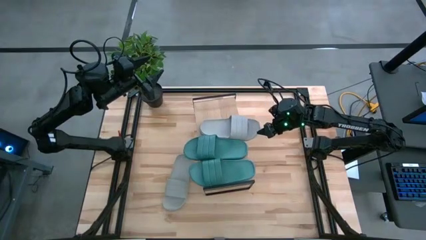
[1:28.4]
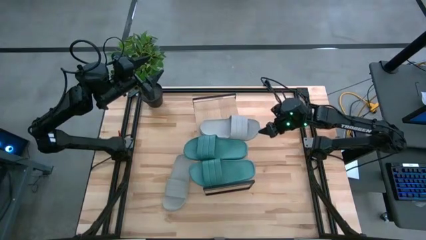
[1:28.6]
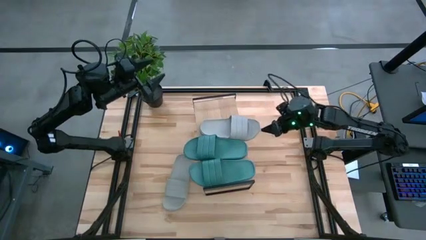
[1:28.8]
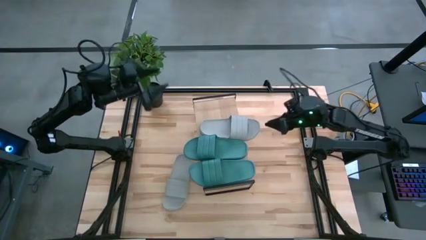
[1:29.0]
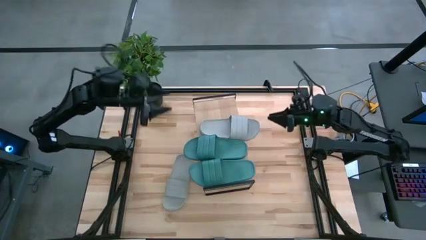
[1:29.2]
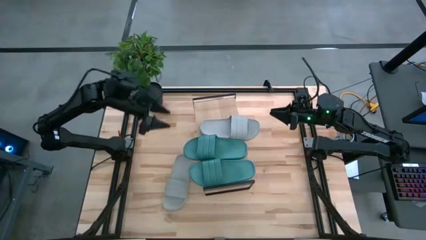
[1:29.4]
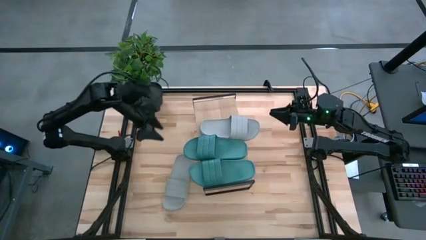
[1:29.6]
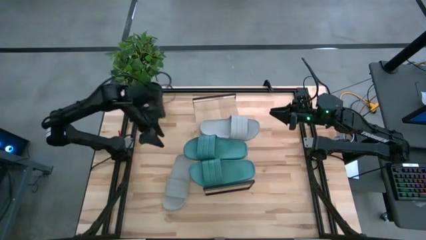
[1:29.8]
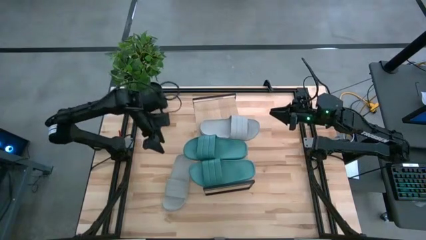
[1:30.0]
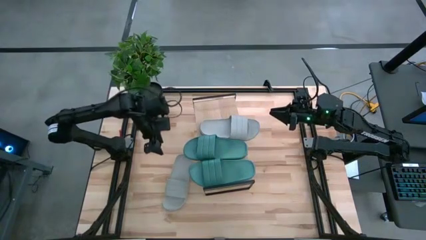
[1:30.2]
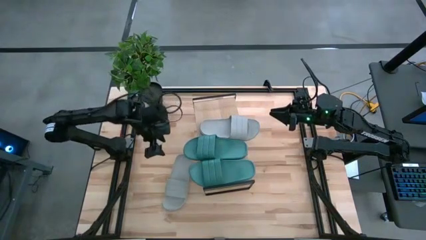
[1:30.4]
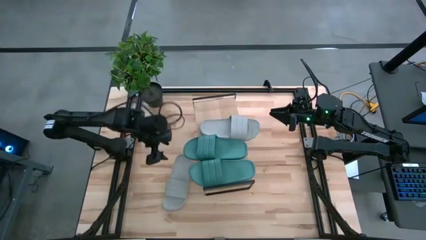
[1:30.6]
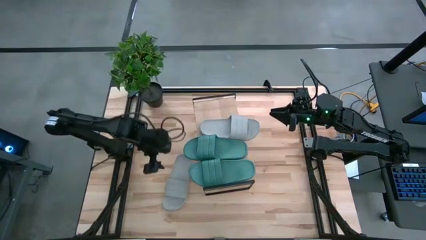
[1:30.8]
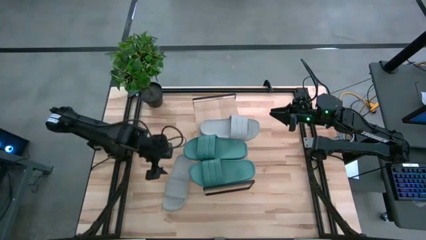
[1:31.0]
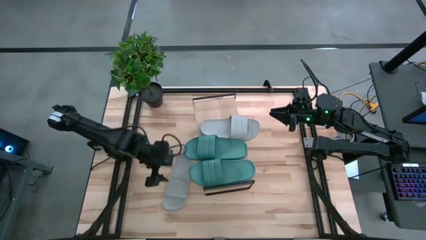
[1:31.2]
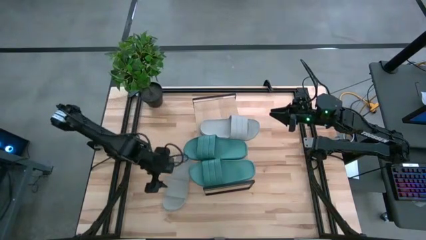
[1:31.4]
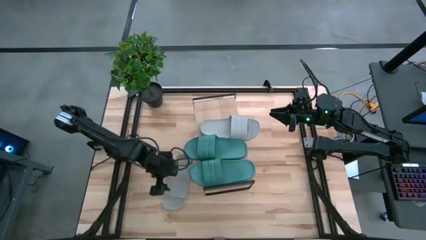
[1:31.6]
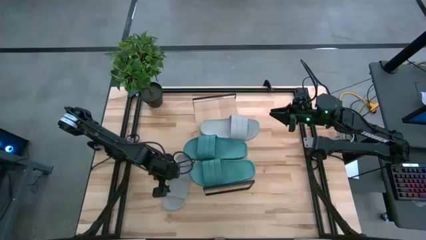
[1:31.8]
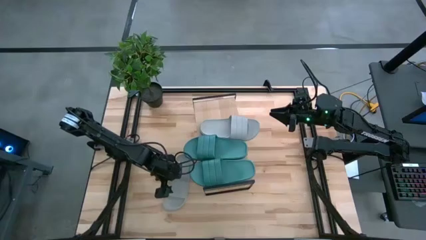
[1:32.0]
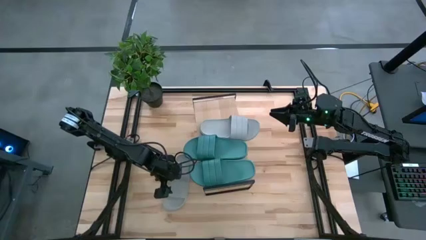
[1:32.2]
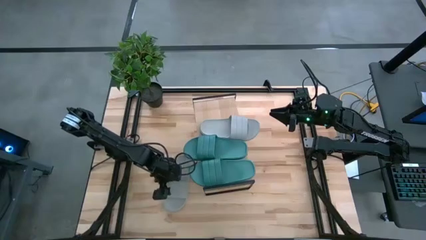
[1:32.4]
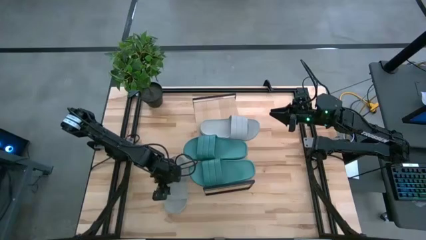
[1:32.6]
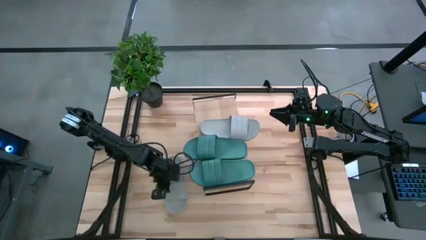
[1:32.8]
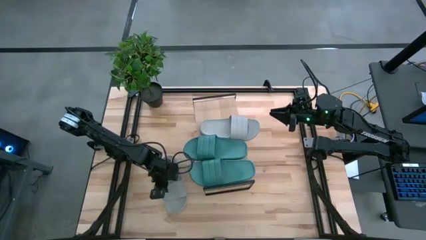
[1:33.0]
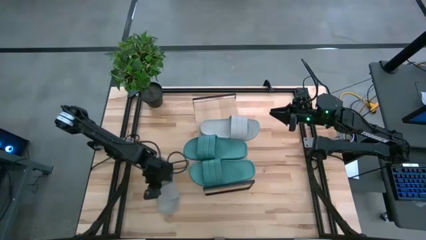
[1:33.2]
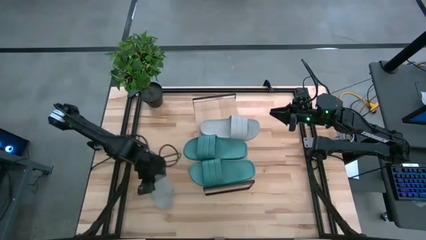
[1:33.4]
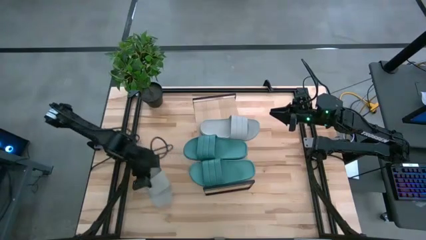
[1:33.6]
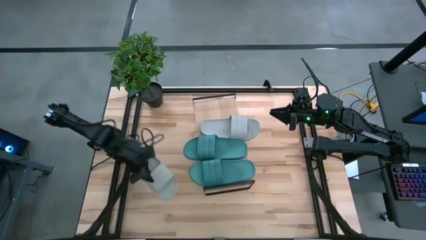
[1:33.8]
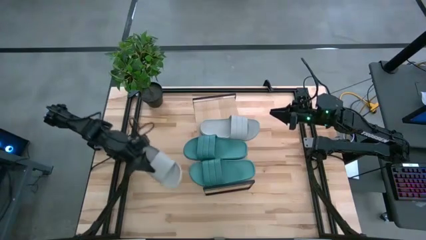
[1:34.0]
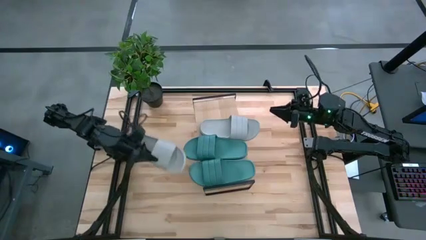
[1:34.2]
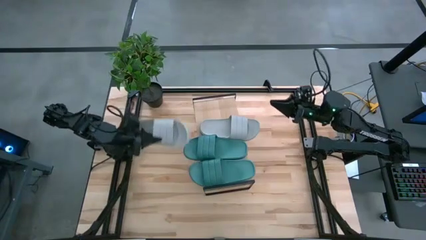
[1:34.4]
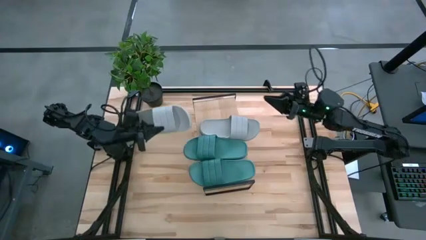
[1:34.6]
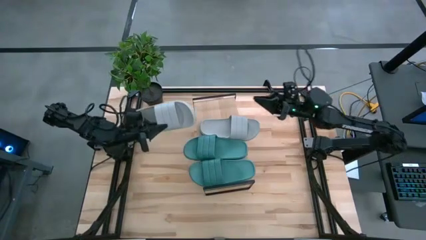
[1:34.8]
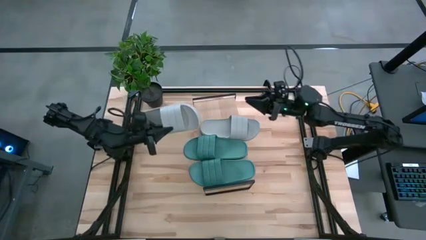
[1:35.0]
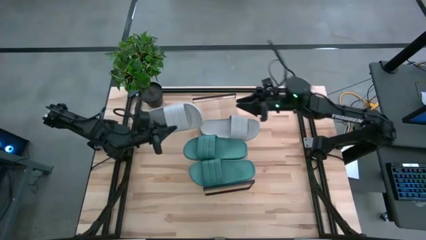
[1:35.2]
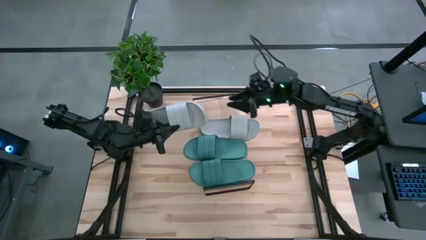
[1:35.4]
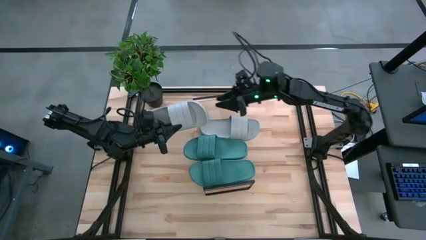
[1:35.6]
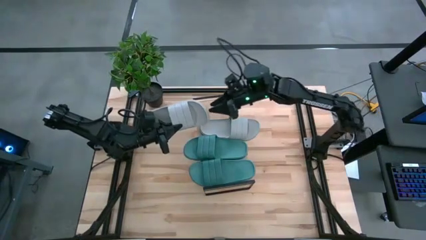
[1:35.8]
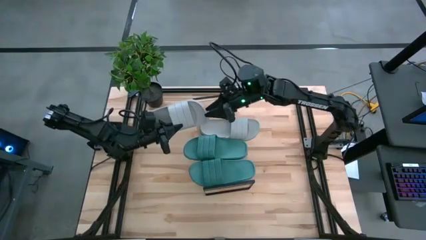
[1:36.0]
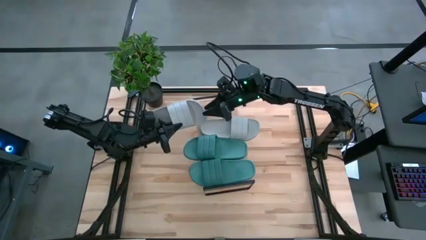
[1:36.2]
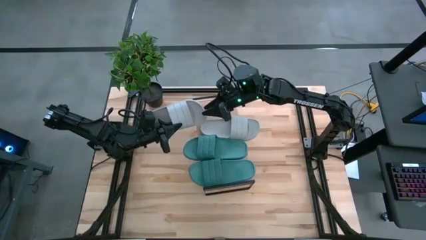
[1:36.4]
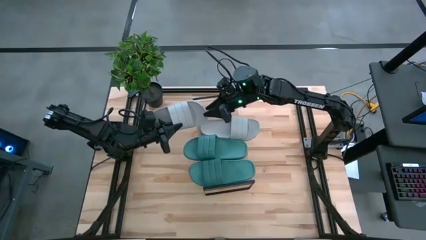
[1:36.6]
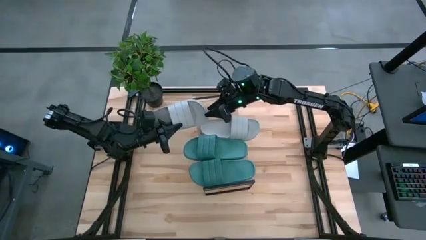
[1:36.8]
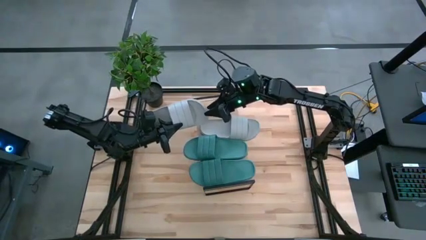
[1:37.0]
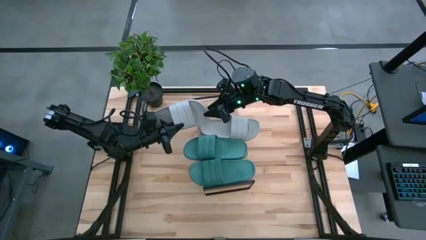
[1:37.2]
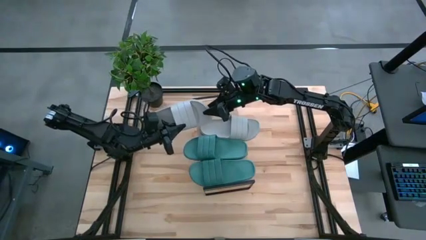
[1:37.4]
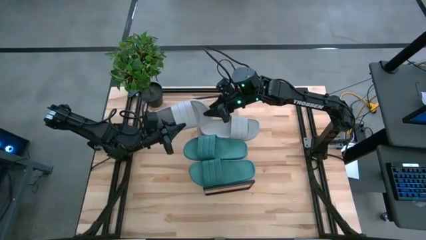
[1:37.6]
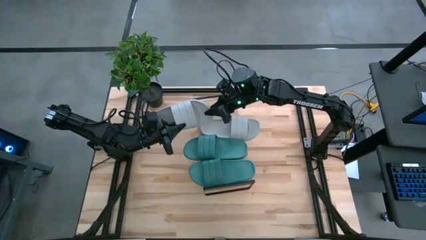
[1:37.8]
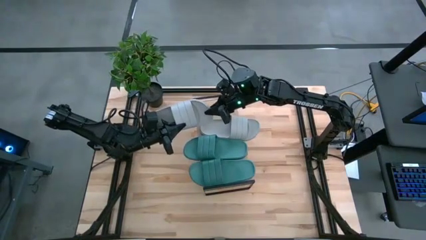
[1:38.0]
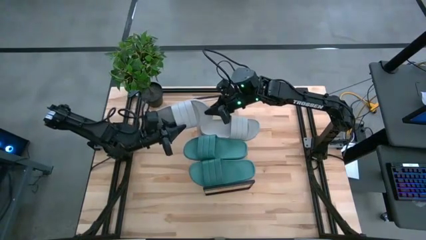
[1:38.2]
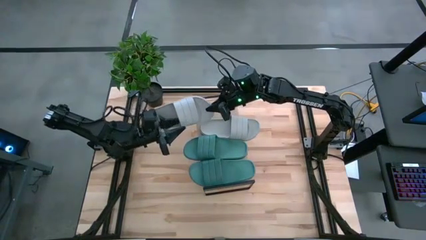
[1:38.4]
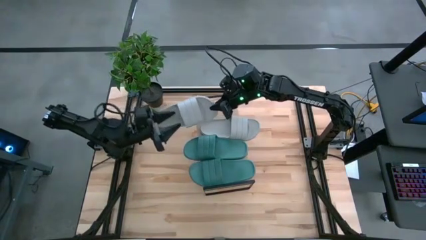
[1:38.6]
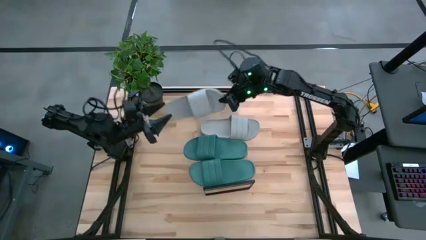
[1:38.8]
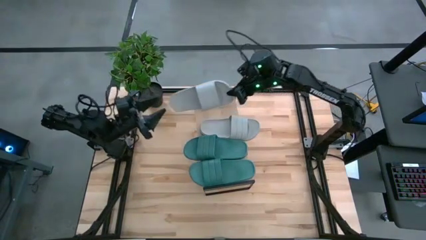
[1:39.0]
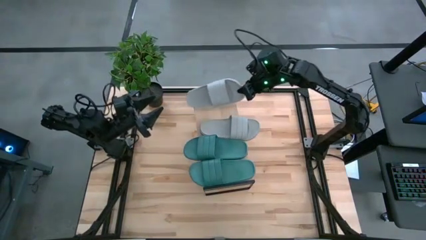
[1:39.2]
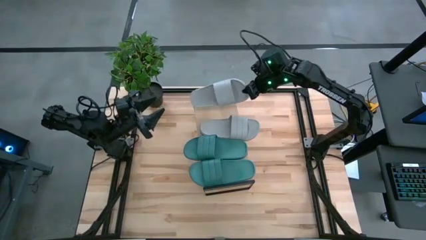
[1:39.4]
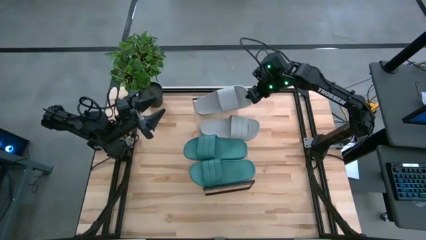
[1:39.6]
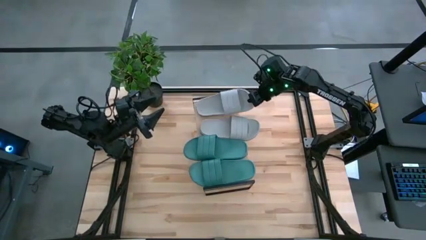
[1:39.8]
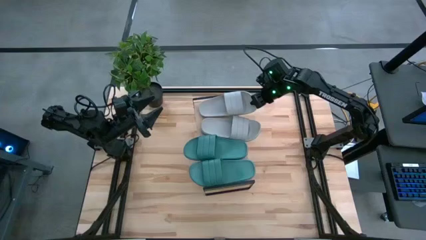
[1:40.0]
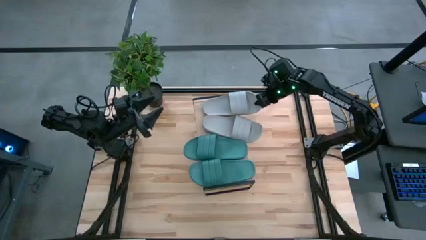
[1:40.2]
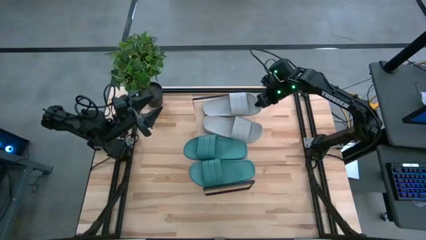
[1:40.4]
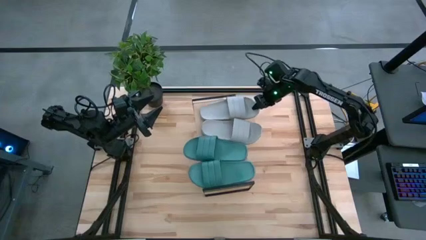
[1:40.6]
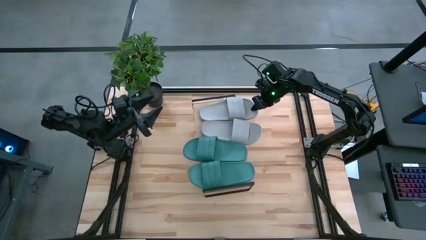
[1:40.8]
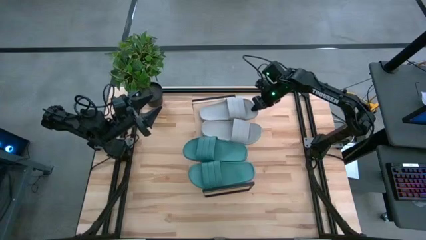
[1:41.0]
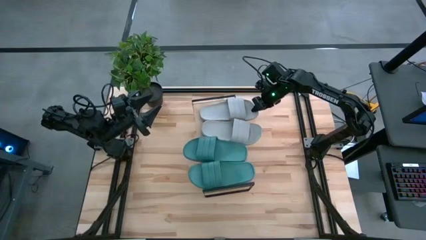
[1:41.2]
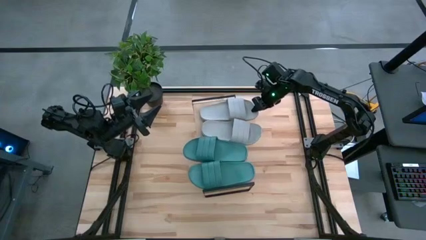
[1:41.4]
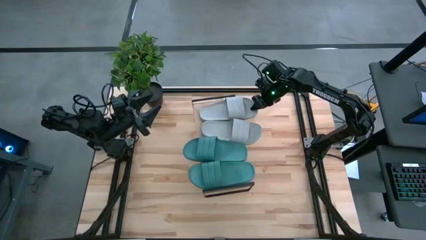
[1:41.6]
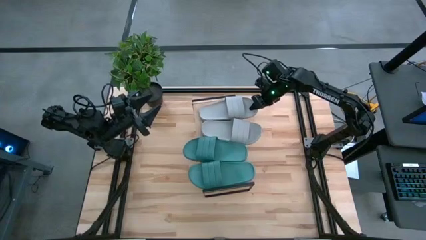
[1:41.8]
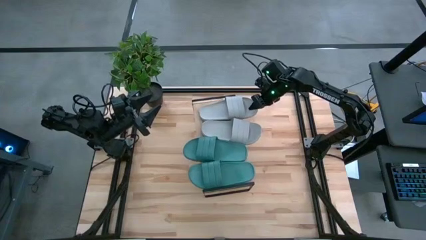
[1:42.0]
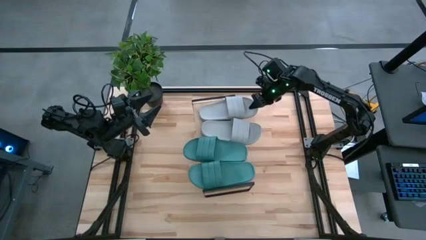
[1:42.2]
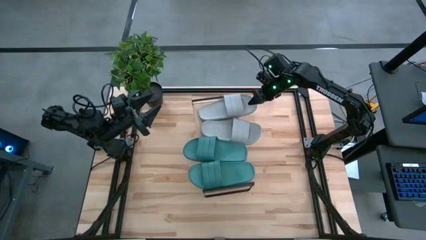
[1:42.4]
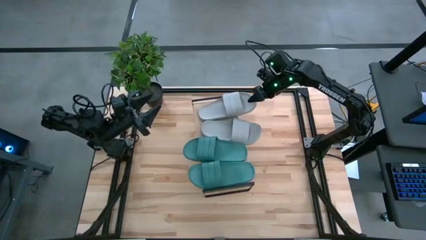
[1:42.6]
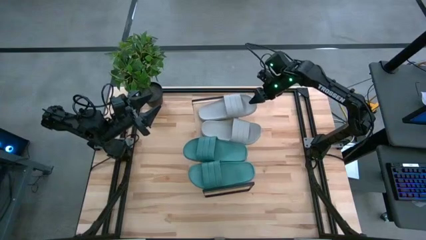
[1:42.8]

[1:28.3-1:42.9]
Task: Pick and place slides into the shelf
Put the gray slipper on the shelf
